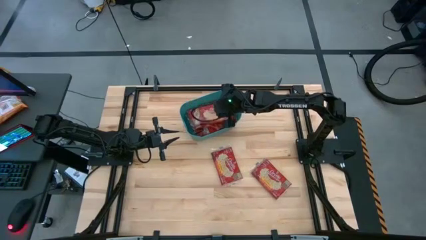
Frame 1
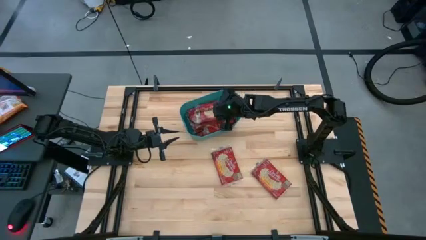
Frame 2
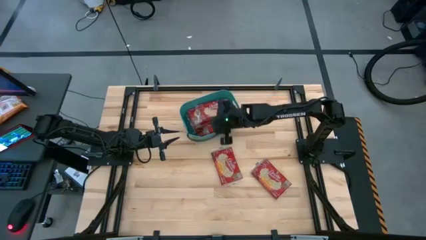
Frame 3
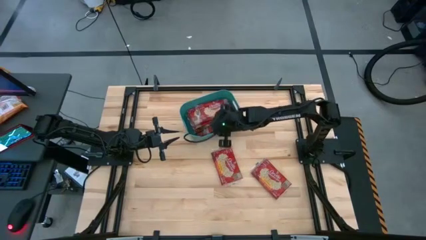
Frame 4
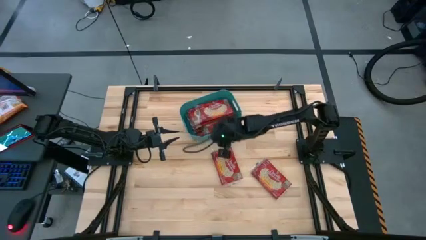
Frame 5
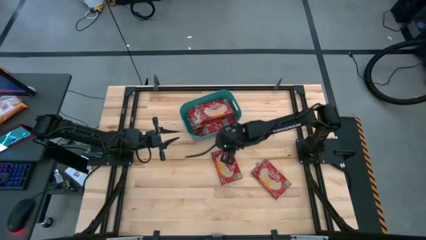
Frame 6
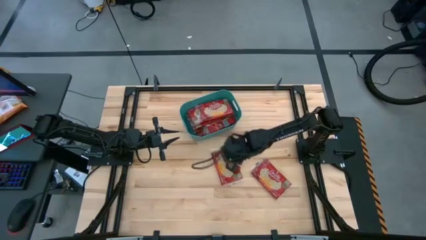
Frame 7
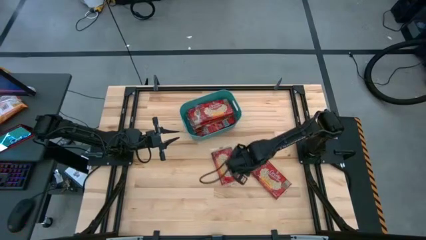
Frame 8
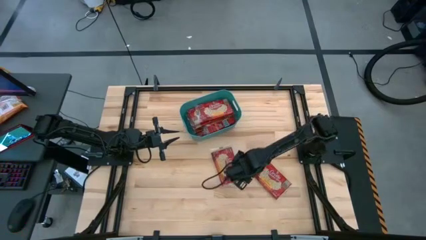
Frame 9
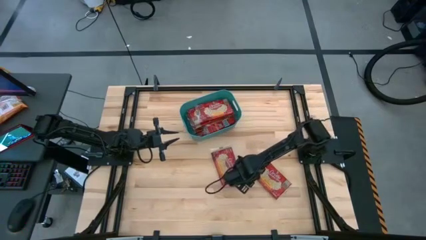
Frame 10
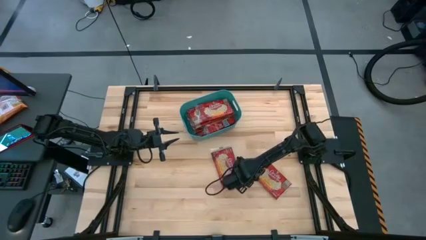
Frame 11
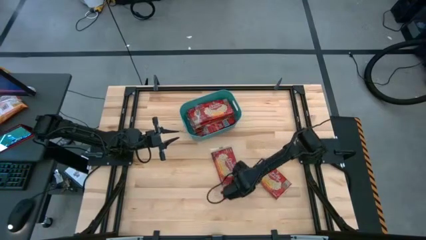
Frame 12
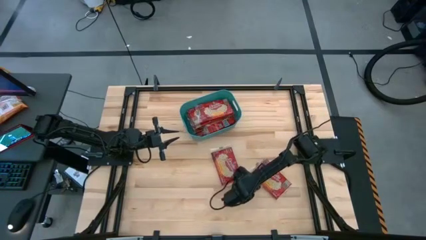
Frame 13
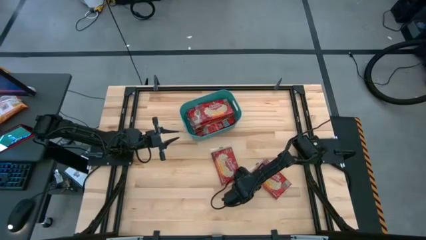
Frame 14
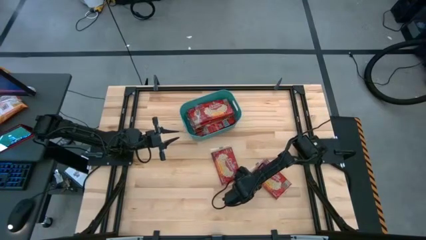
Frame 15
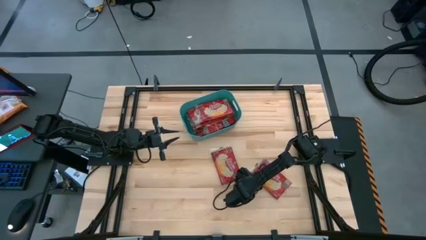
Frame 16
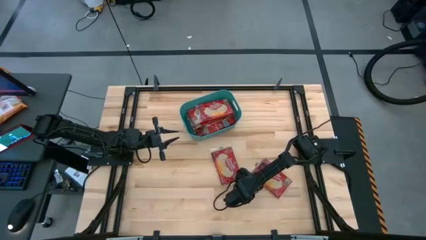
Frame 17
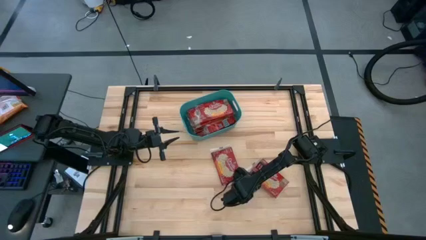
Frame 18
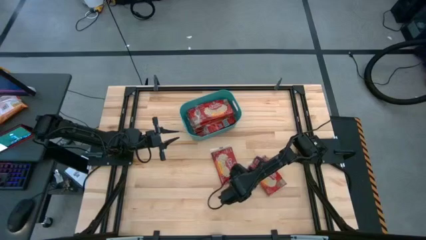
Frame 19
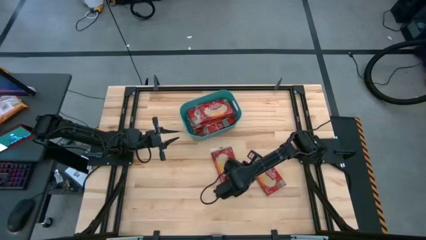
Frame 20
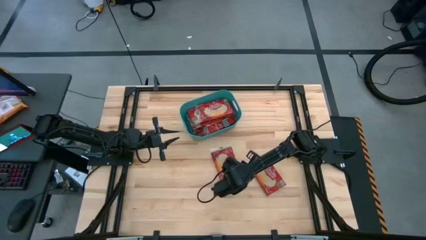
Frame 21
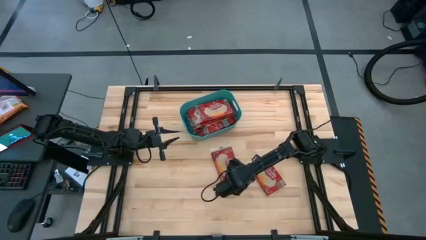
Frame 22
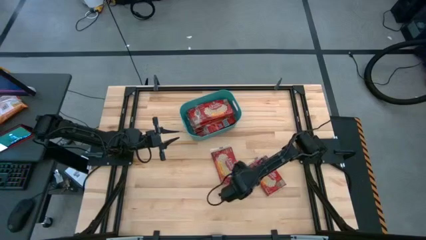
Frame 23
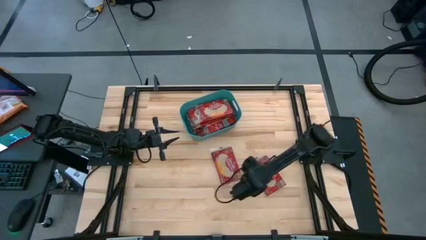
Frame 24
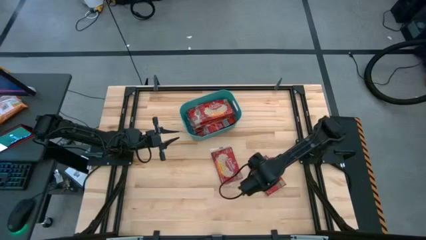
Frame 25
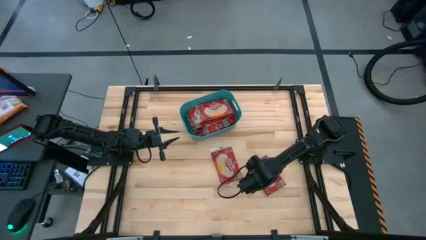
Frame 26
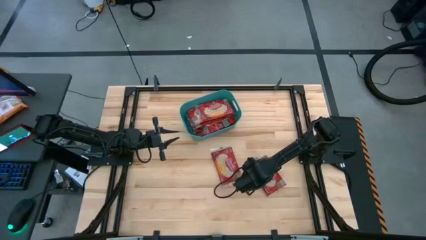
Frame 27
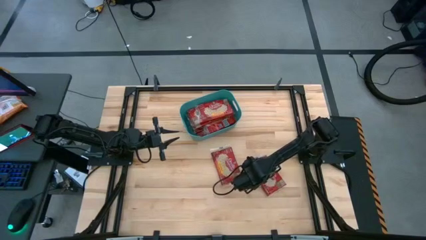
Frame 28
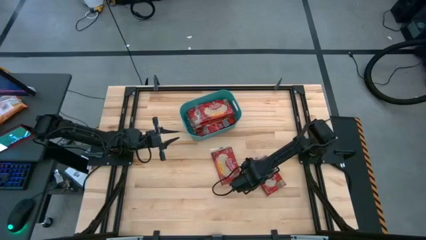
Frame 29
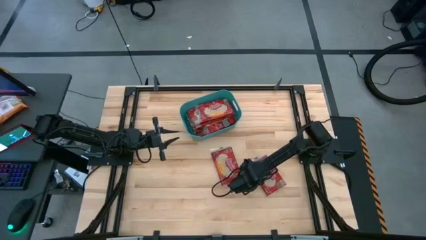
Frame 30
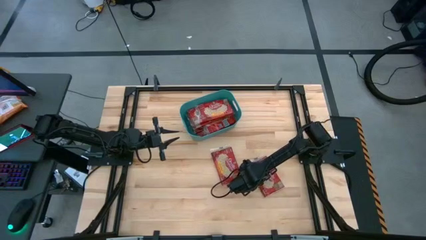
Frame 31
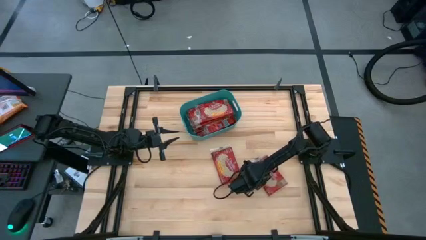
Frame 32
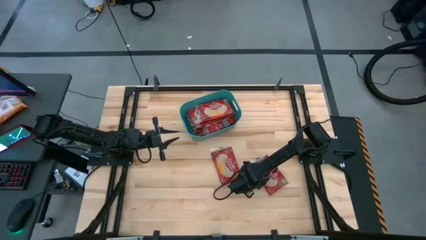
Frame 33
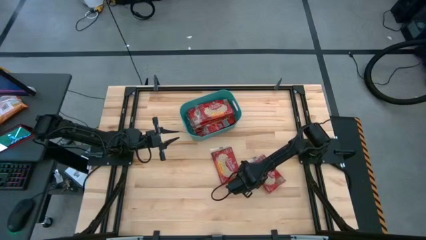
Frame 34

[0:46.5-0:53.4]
Task: Sort popcorn bags into baskets
Put the red popcorn bag into the green bin

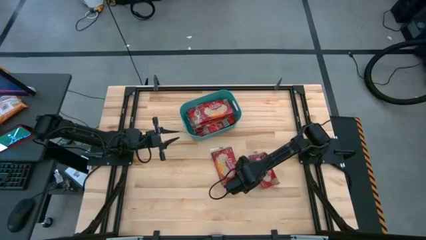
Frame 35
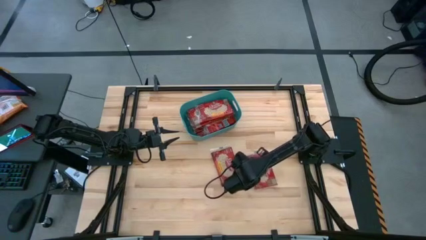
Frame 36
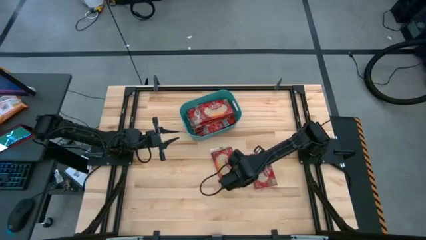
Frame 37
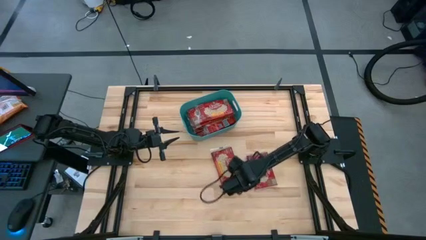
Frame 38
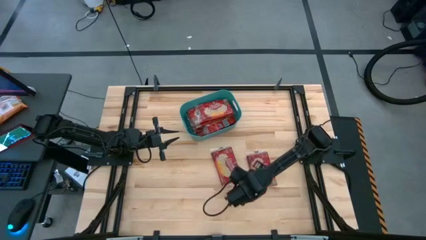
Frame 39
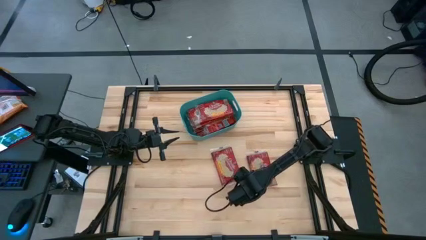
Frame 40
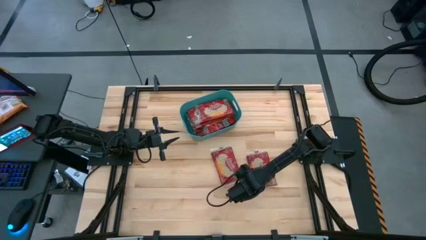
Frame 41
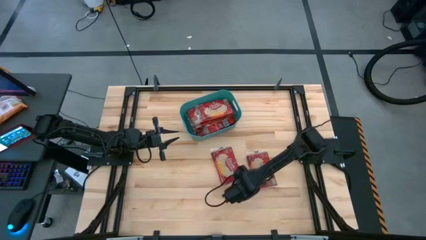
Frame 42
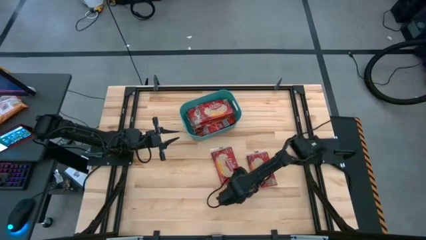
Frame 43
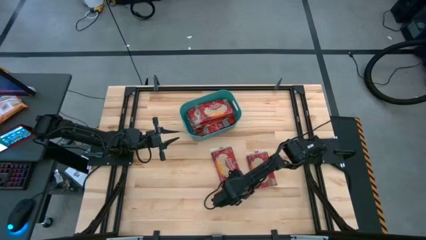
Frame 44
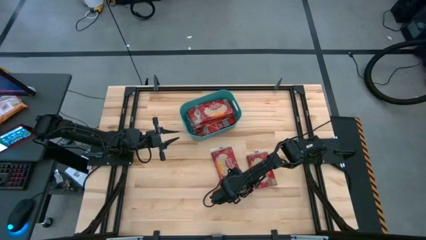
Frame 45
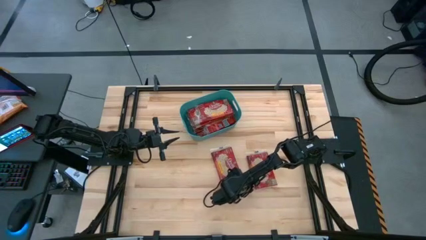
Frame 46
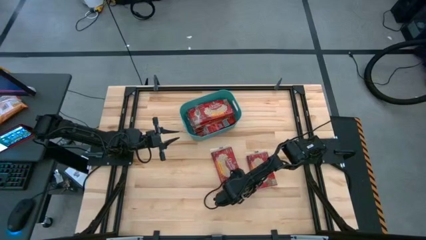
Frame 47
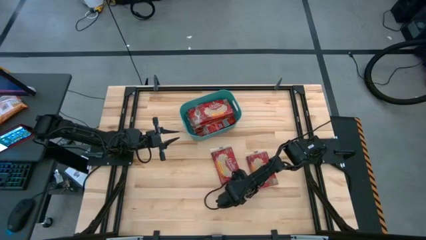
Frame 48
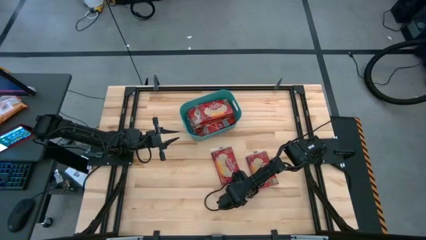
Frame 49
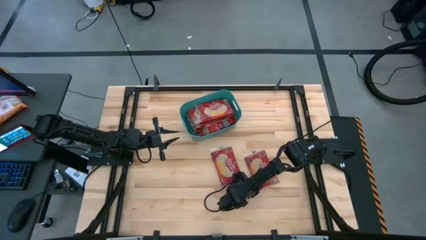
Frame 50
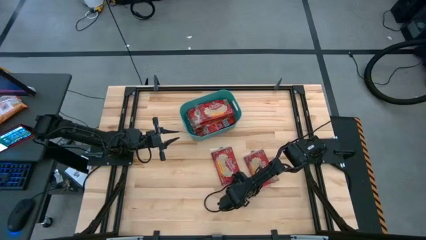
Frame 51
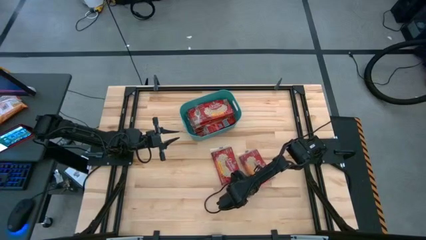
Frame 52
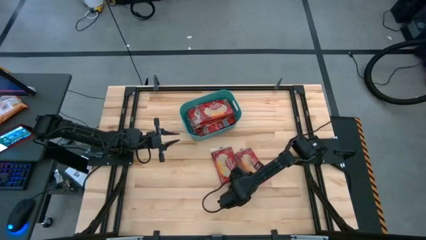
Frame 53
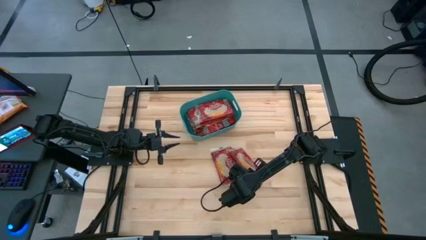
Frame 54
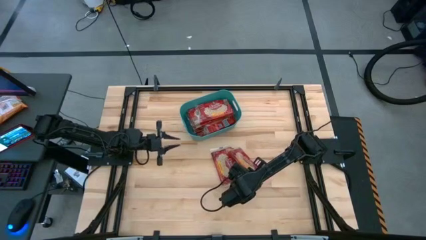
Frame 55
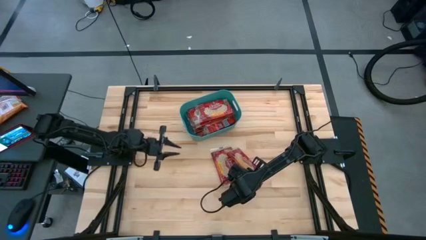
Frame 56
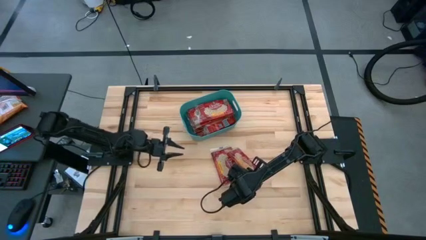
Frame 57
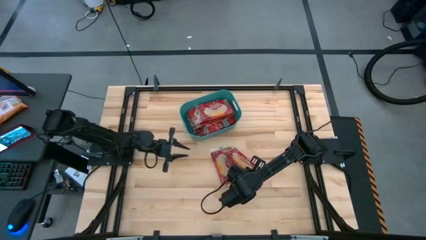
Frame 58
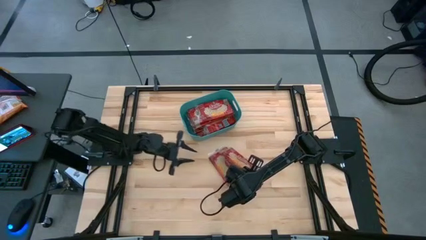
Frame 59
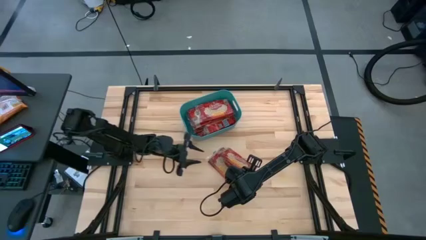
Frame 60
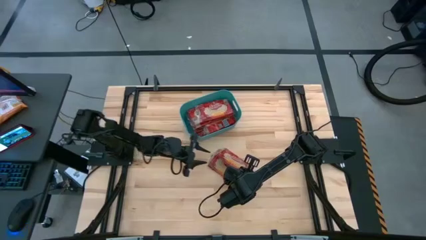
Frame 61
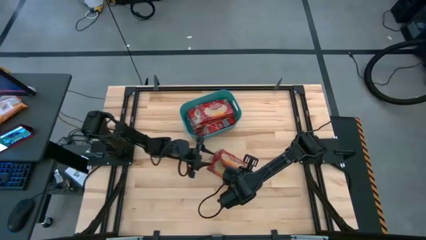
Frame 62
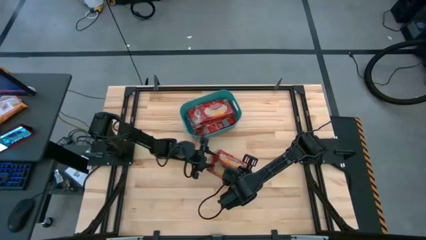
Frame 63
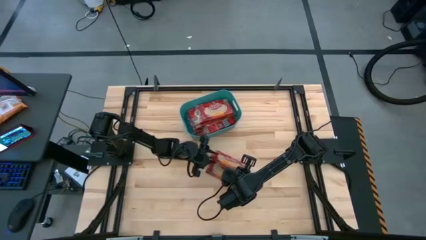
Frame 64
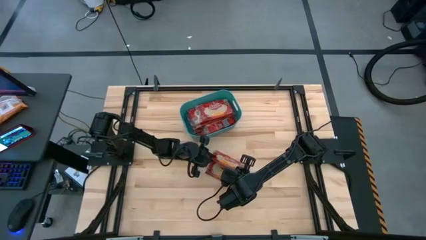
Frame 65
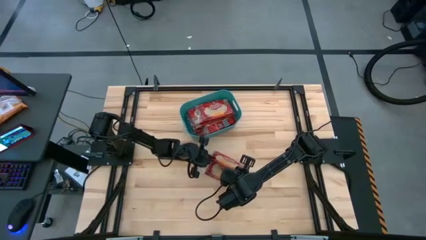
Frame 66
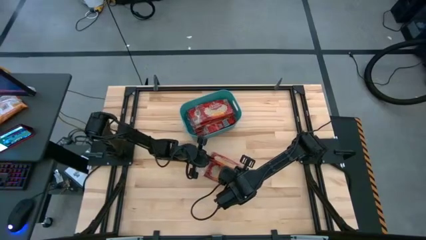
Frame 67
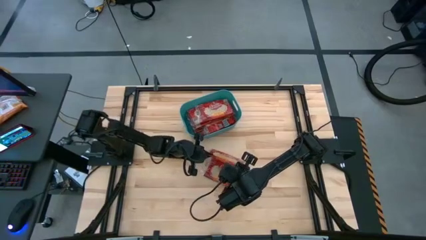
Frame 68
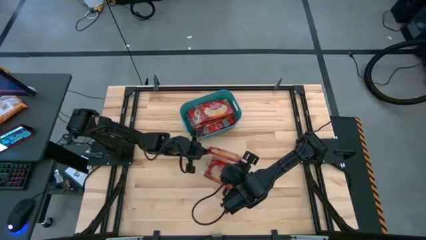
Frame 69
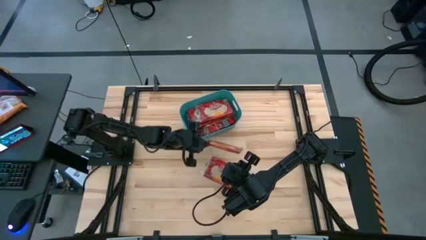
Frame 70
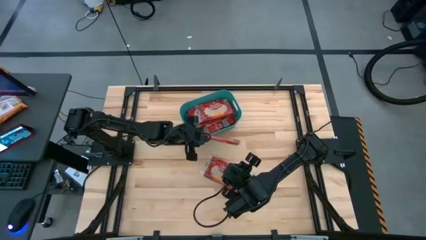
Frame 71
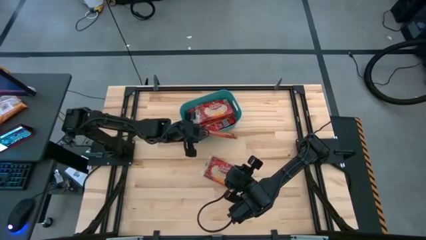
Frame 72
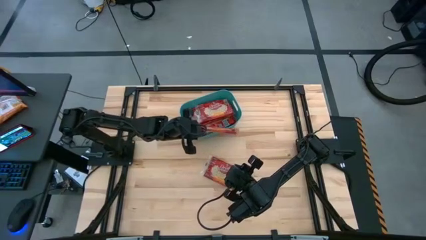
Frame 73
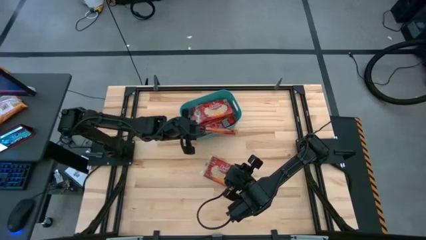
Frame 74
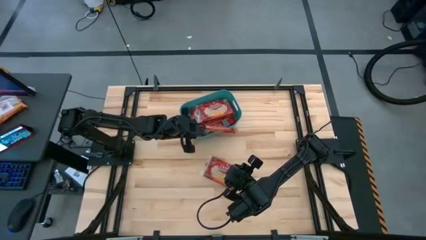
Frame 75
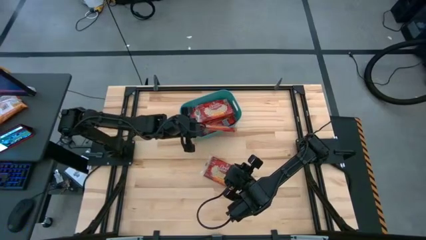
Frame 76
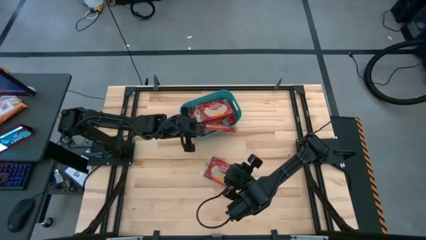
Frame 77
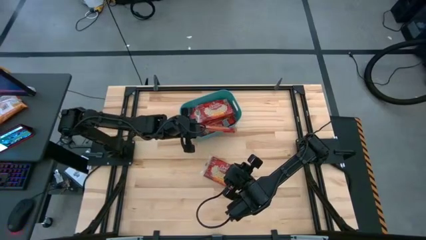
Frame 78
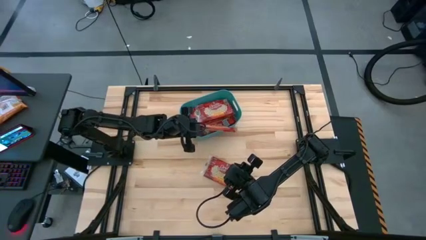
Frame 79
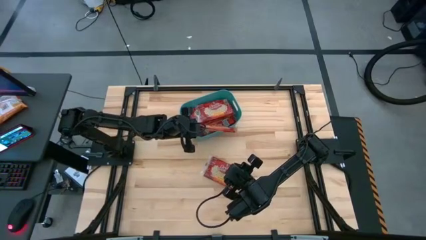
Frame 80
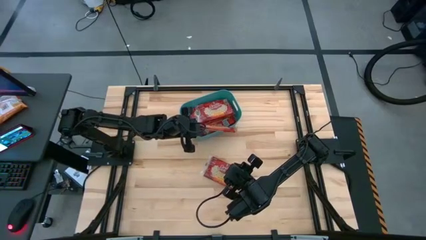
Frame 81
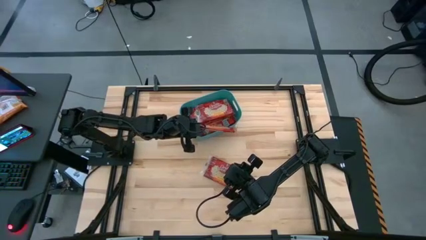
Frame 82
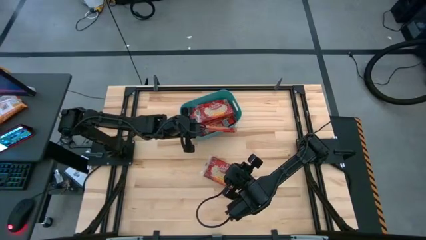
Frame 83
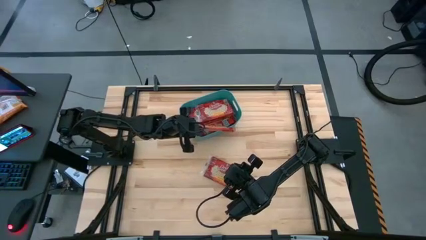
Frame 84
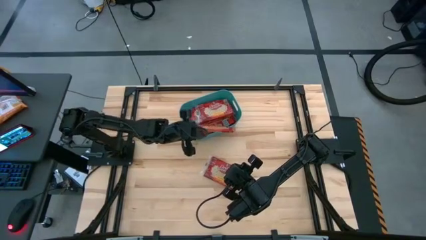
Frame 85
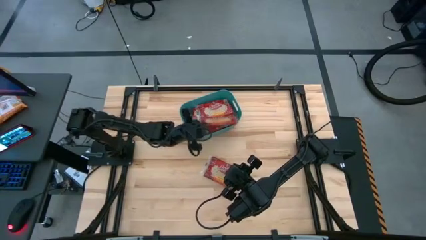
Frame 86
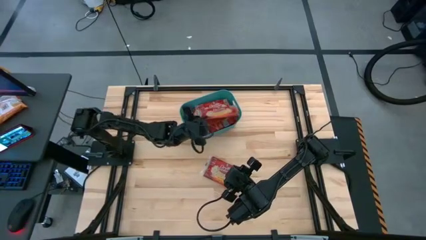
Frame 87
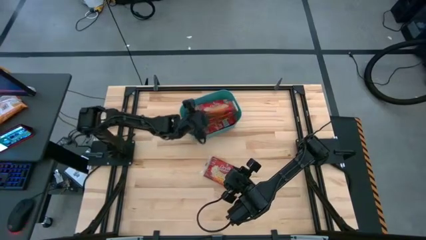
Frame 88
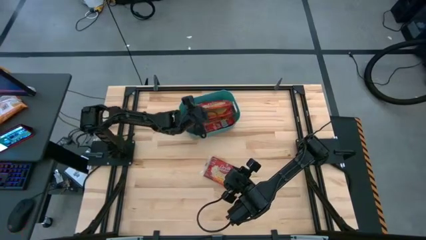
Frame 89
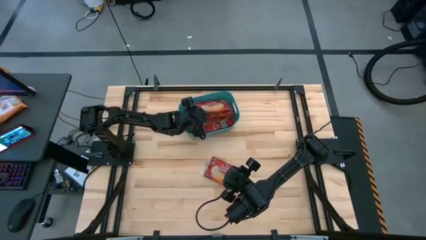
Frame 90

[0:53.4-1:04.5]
Put the red popcorn bag into the green bin
